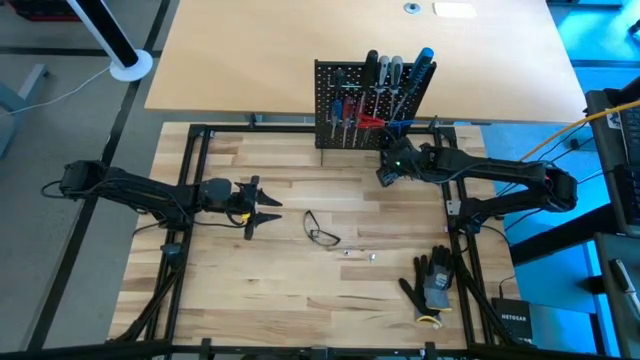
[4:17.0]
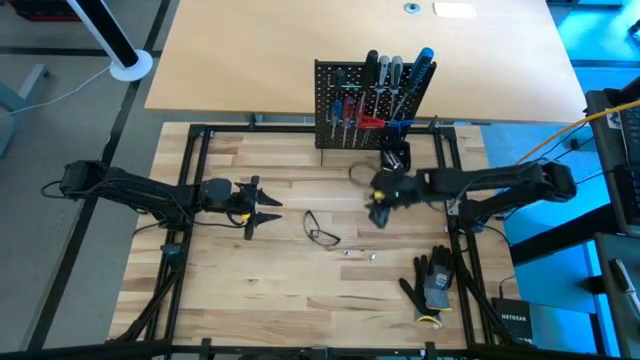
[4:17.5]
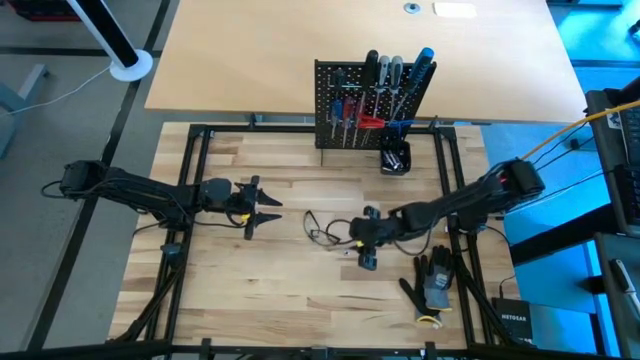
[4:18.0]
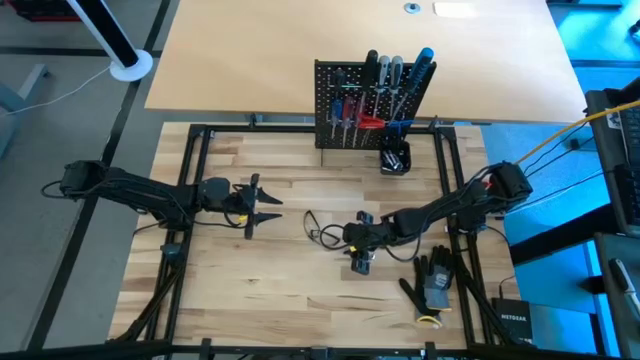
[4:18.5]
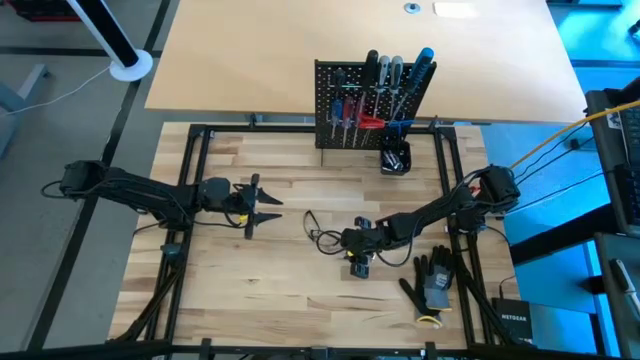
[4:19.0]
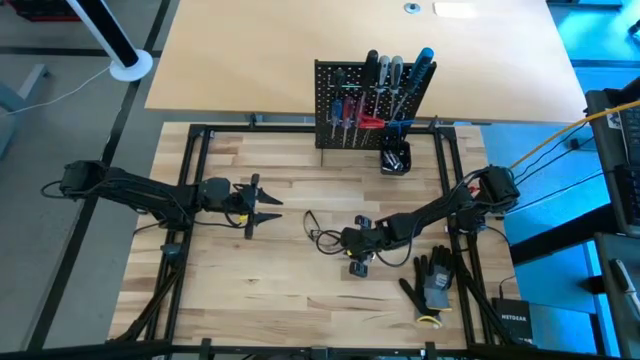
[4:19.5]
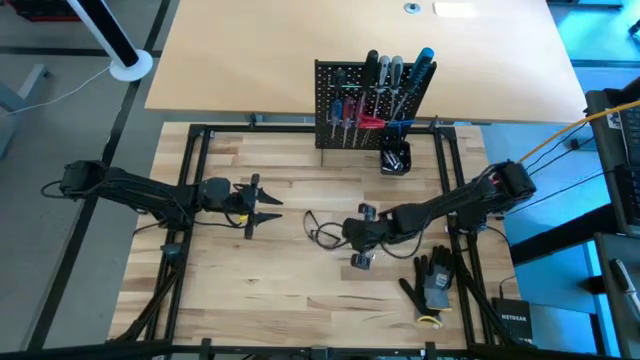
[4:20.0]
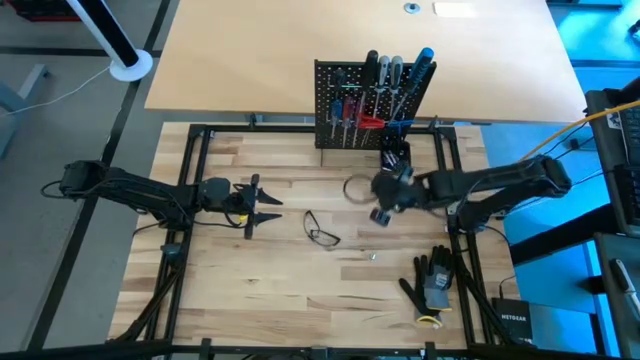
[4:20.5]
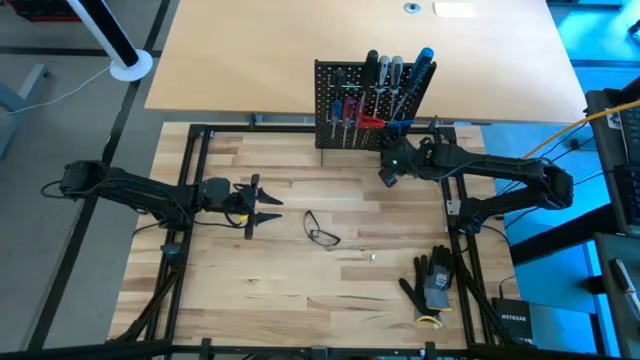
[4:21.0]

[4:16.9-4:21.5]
Task: Hang tools onto peg board
Put the silver socket in the black bin on the peg board

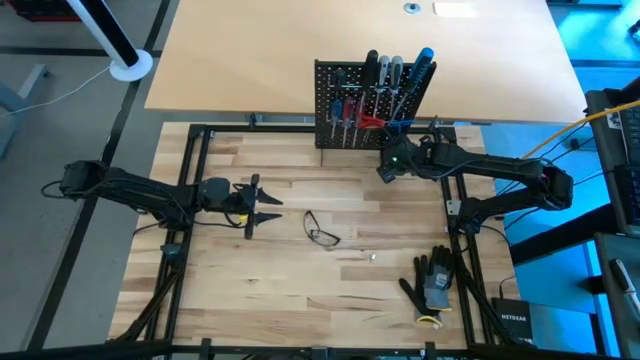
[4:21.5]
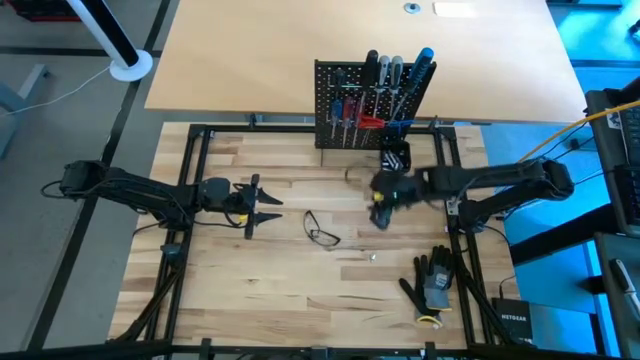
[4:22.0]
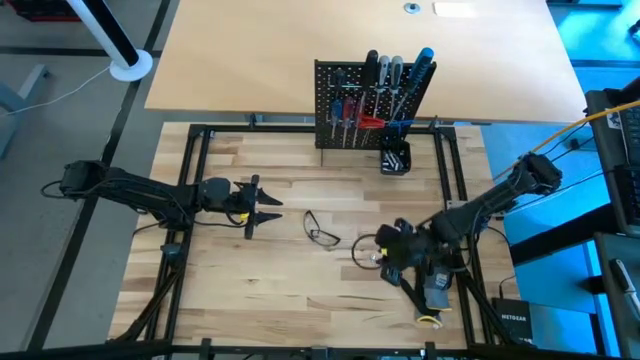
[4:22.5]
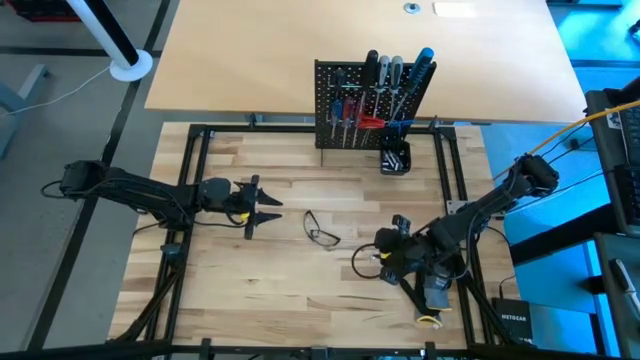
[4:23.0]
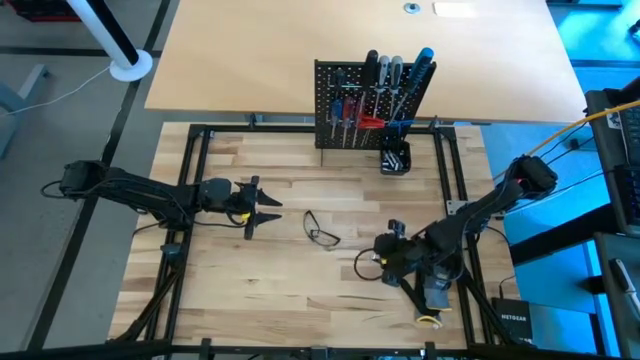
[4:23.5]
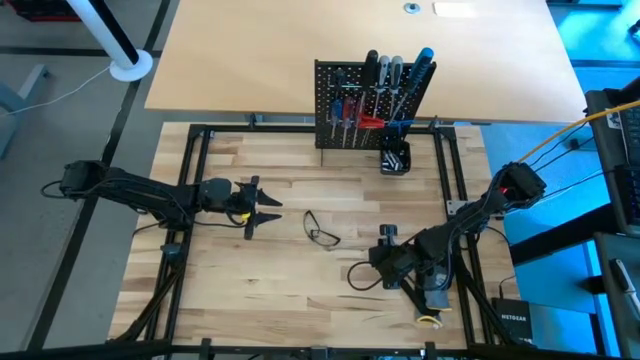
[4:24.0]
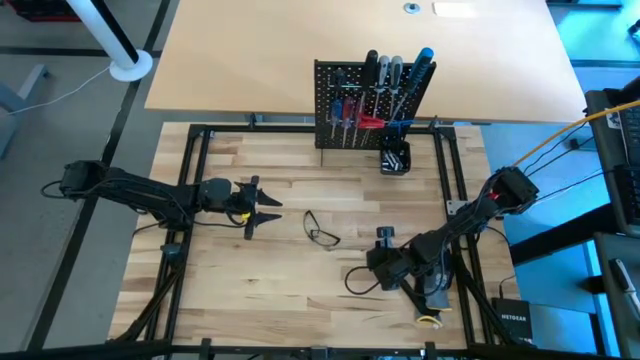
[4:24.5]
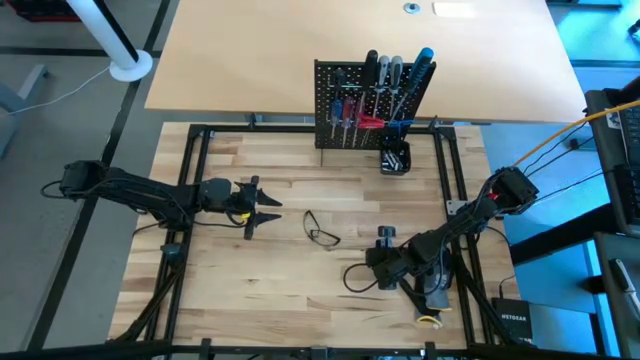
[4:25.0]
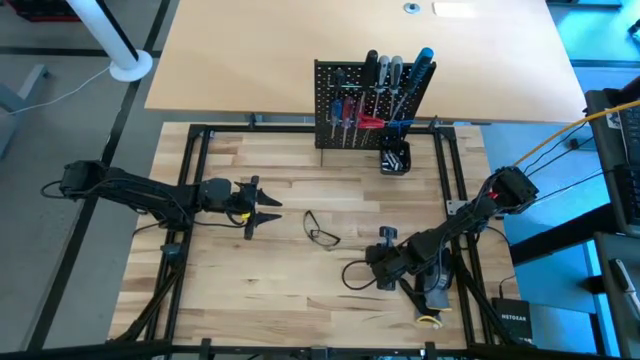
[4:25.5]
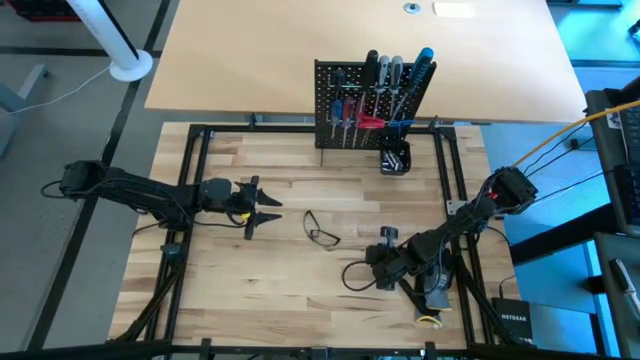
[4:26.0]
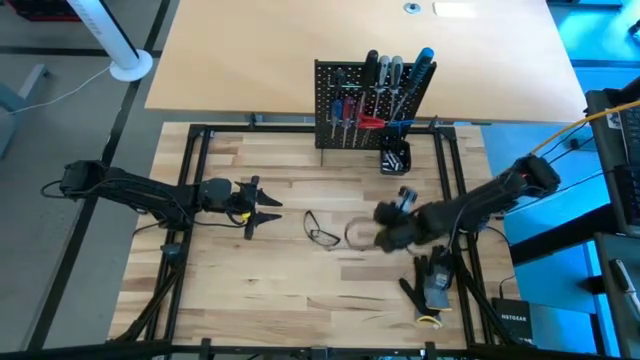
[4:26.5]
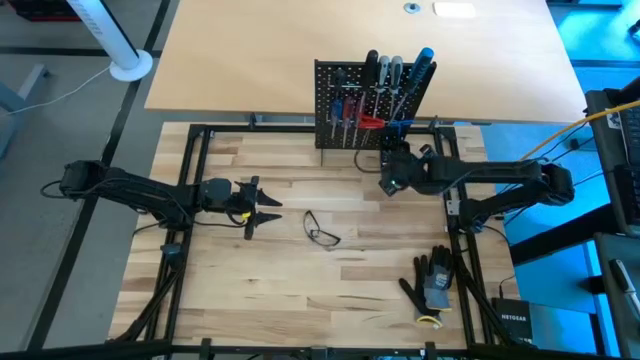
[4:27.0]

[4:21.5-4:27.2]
Put the silver socket in the black bin on the peg board

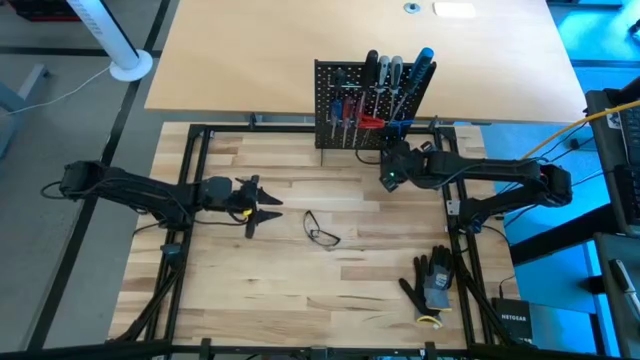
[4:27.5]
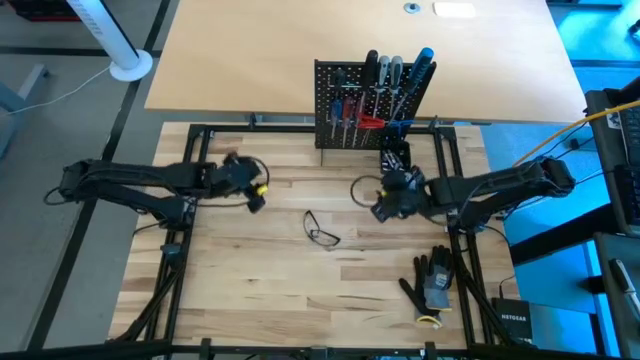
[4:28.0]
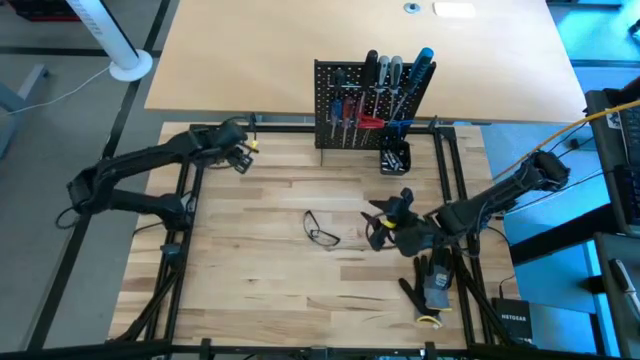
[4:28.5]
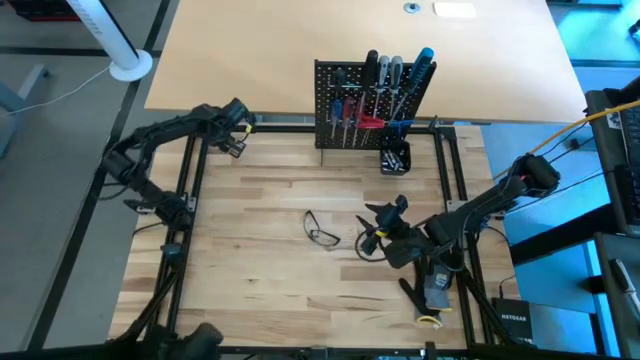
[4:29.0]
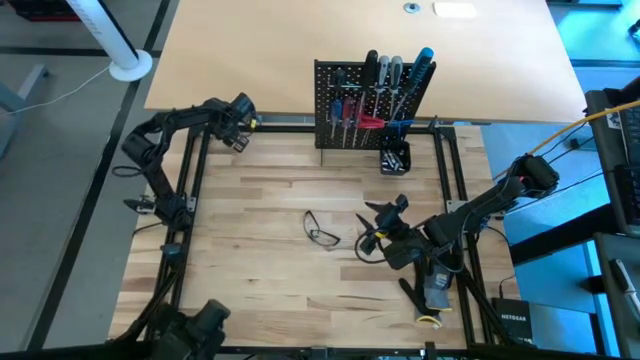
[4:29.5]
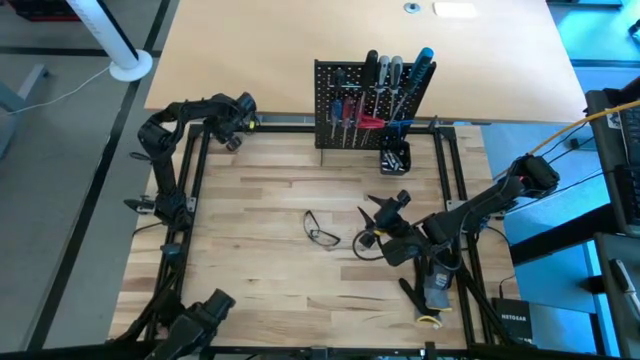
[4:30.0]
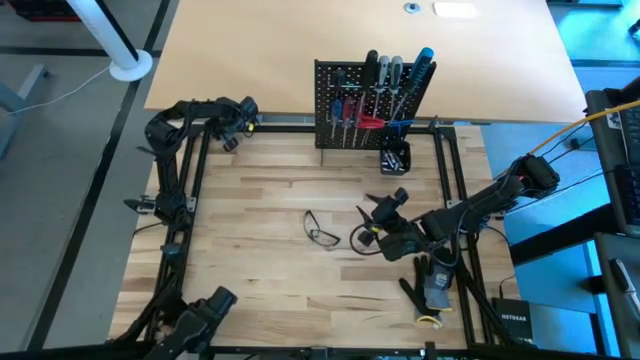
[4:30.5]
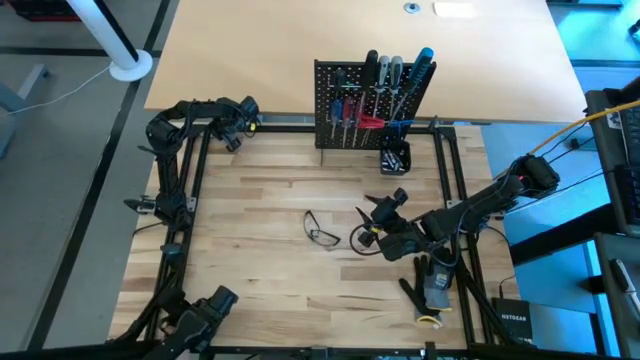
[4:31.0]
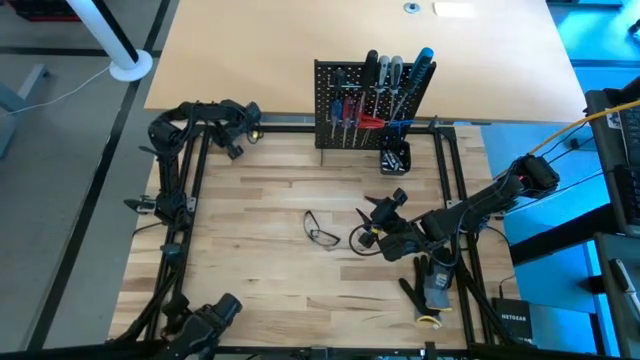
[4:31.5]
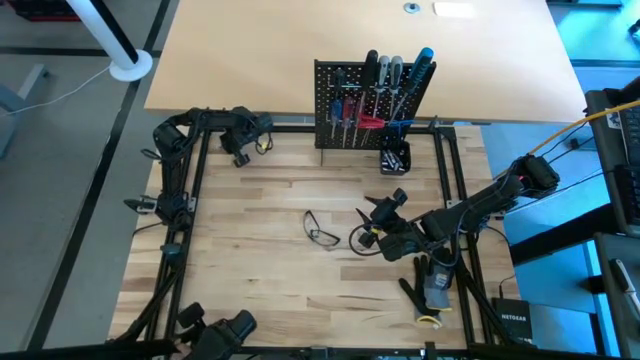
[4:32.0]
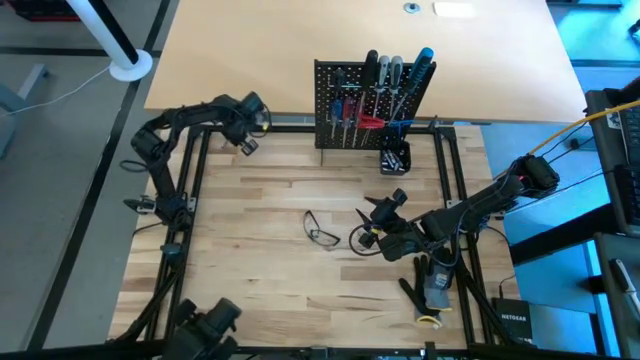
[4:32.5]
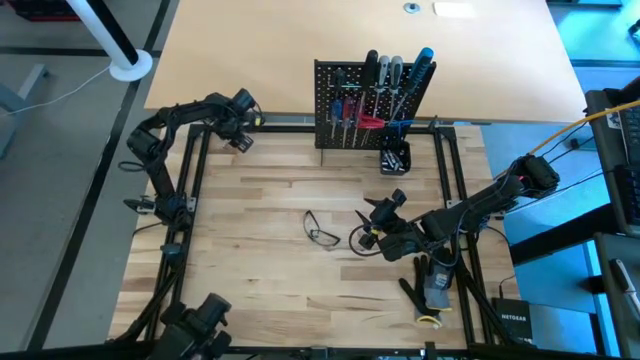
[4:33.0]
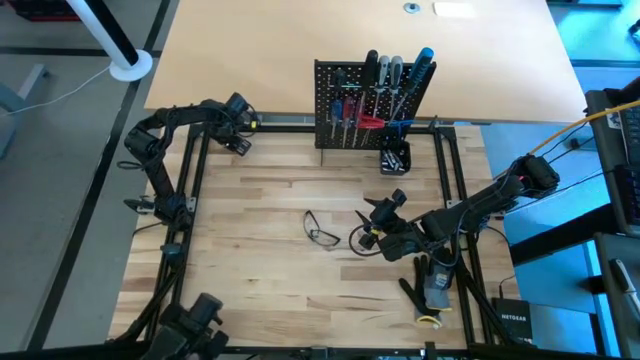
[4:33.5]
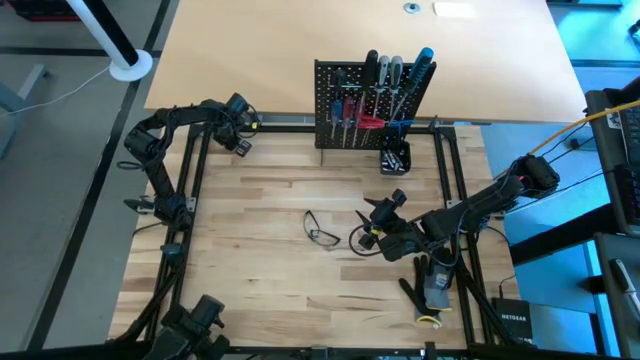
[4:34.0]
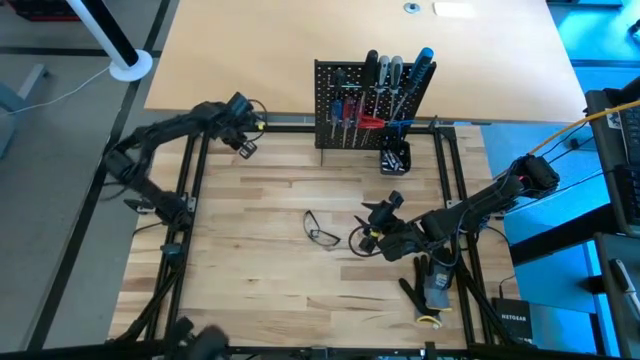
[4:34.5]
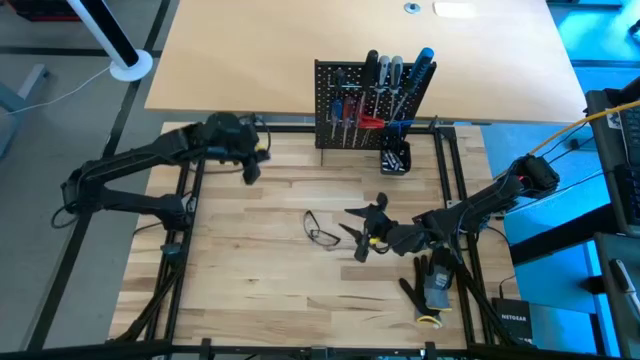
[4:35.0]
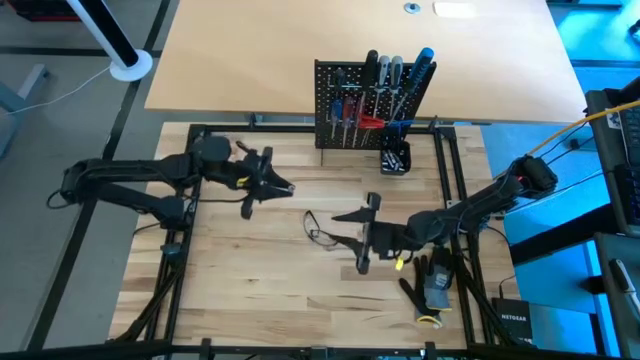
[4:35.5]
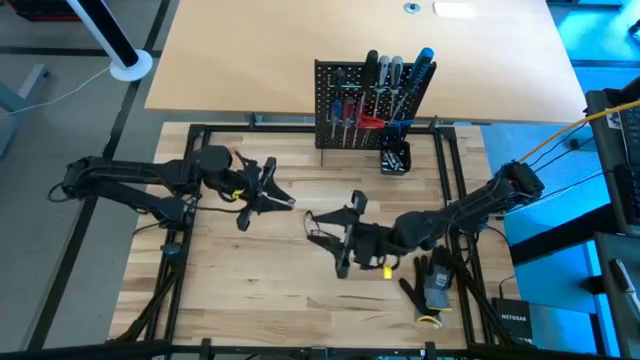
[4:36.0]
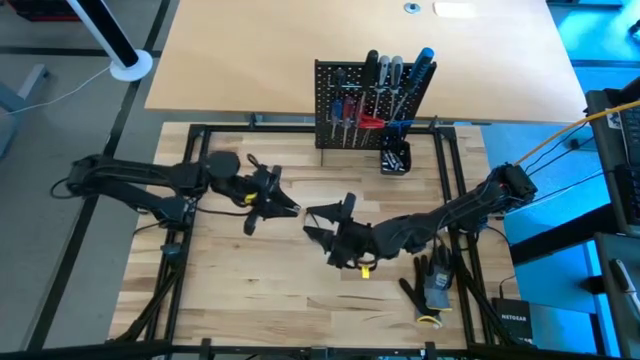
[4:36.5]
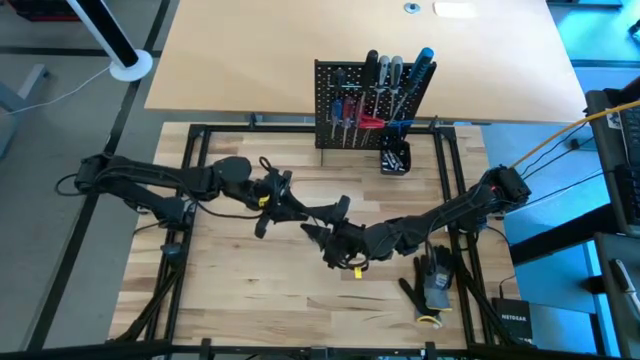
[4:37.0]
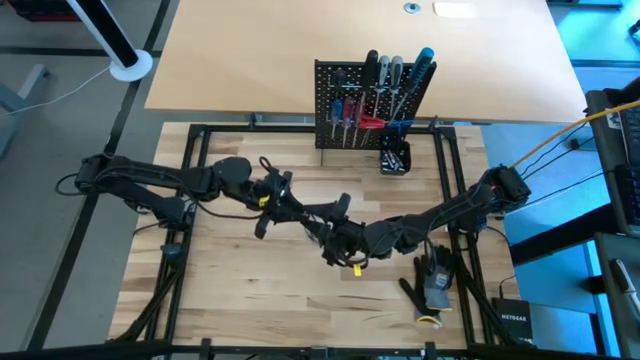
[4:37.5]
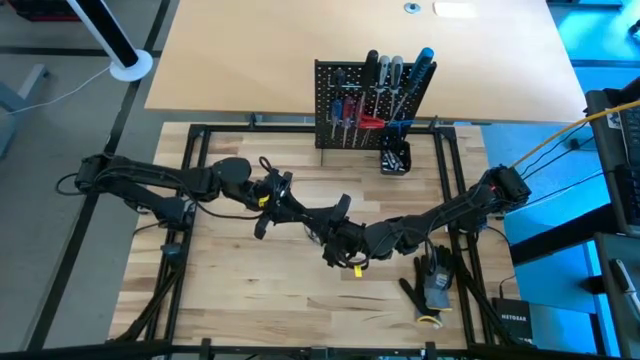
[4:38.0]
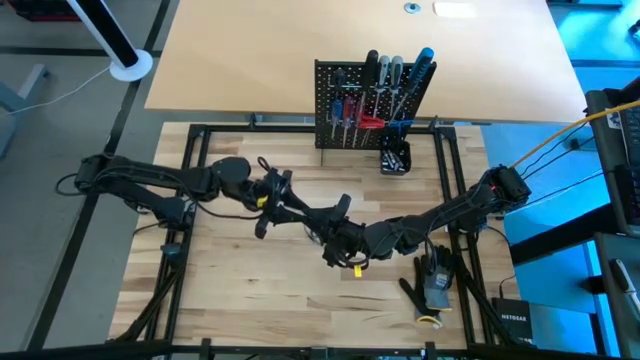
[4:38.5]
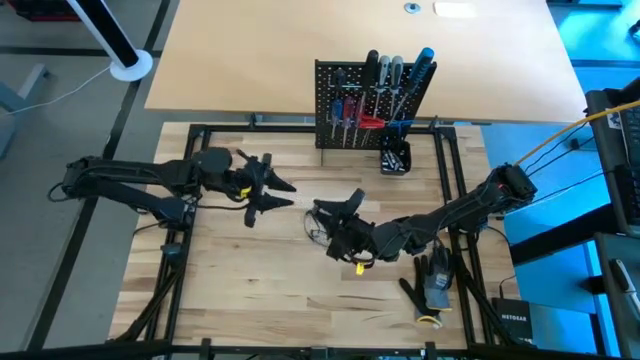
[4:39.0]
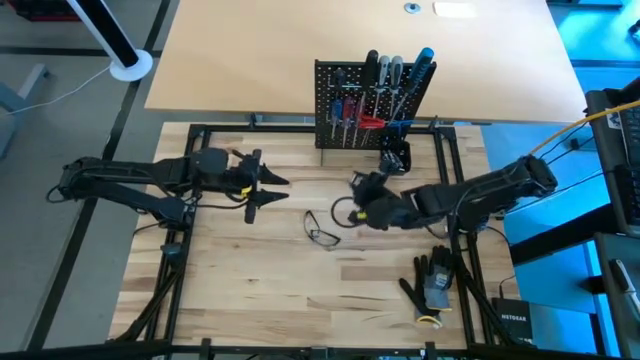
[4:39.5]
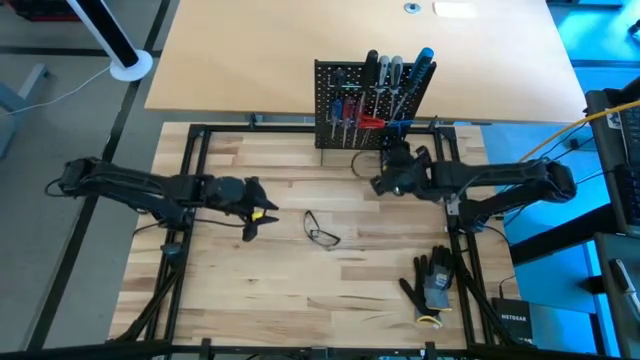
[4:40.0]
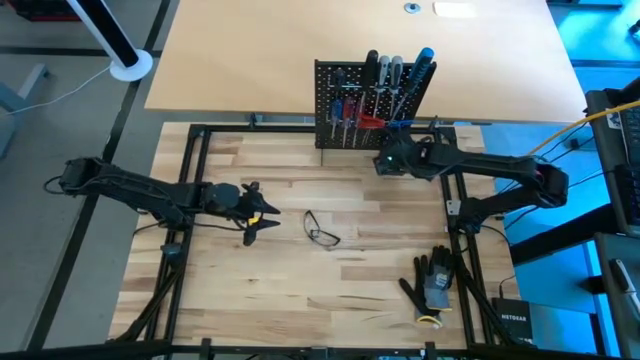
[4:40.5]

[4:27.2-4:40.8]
Put the silver socket in the black bin on the peg board
